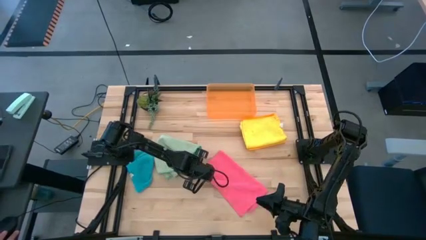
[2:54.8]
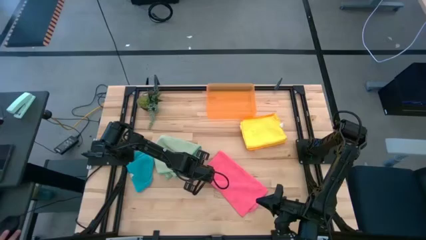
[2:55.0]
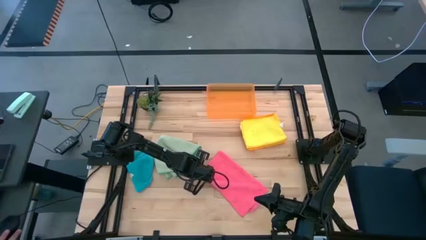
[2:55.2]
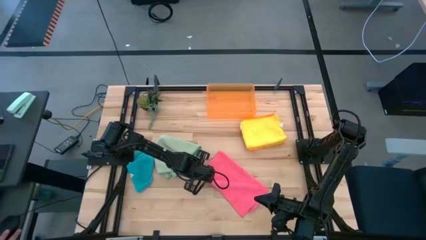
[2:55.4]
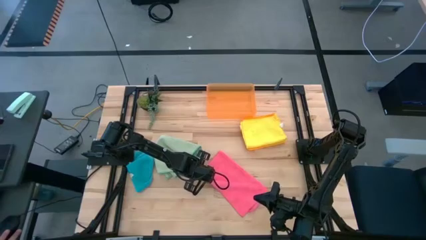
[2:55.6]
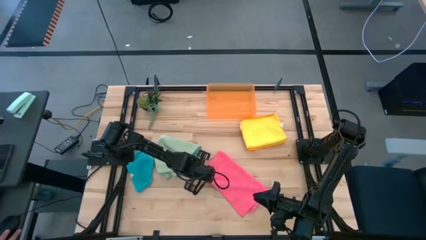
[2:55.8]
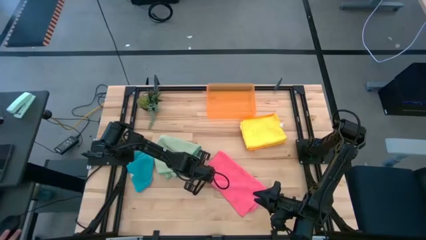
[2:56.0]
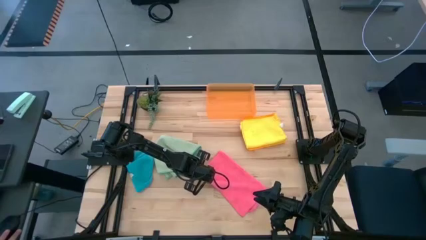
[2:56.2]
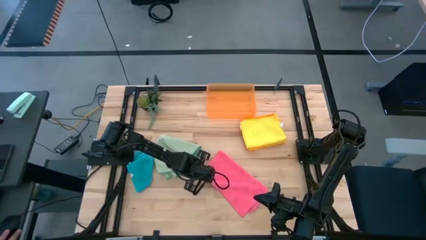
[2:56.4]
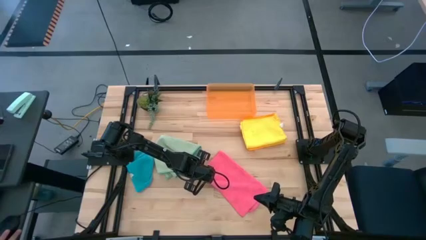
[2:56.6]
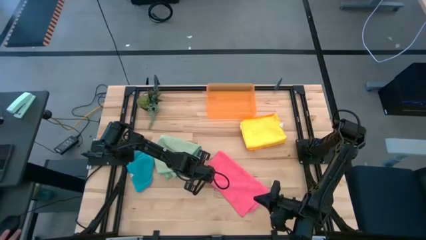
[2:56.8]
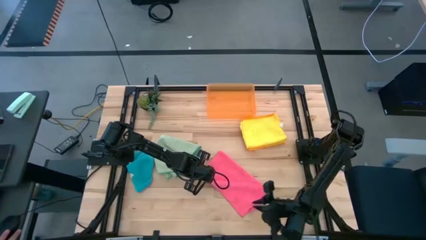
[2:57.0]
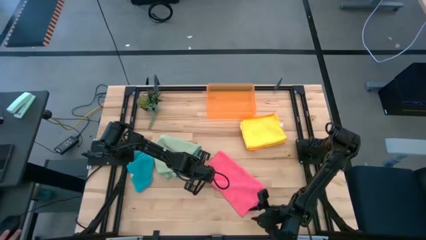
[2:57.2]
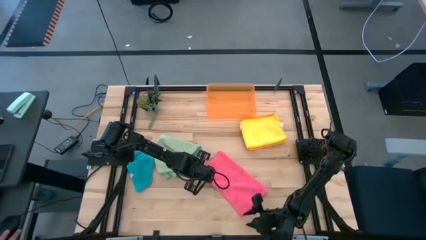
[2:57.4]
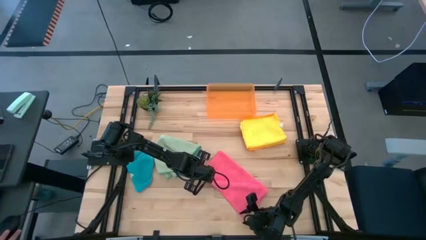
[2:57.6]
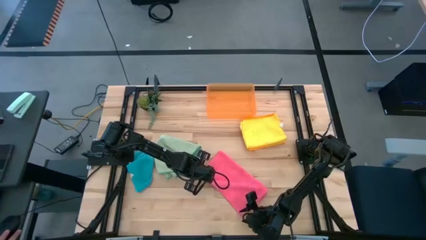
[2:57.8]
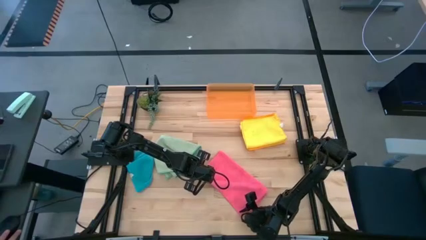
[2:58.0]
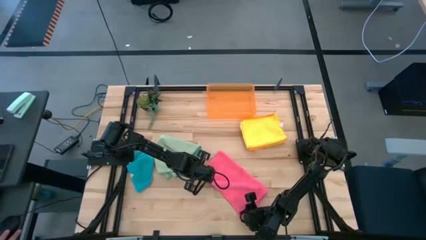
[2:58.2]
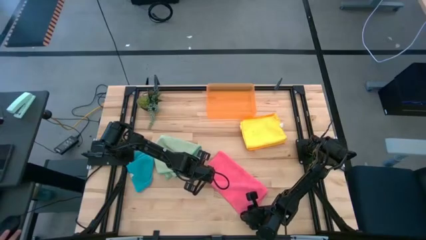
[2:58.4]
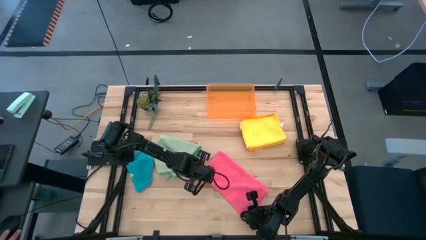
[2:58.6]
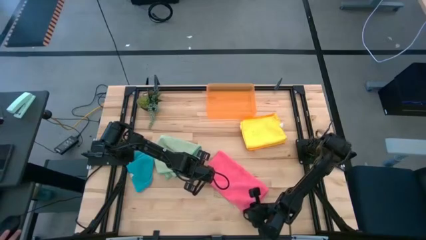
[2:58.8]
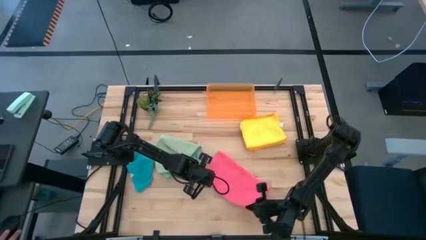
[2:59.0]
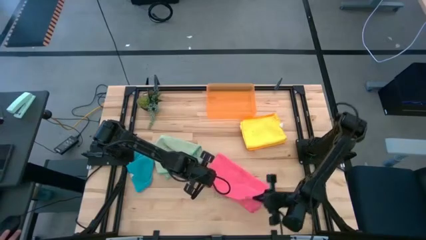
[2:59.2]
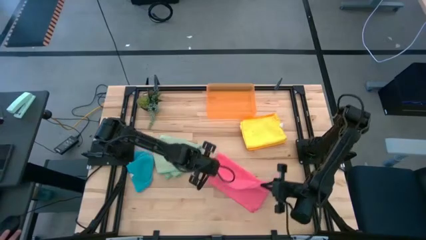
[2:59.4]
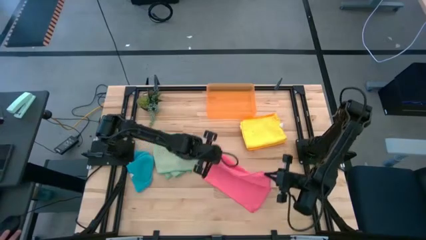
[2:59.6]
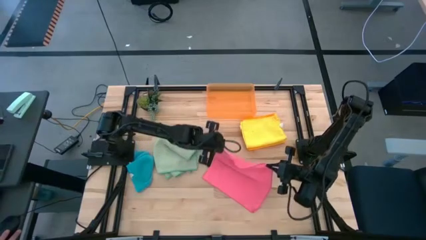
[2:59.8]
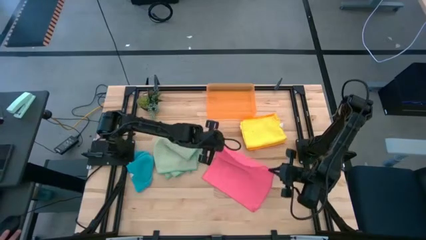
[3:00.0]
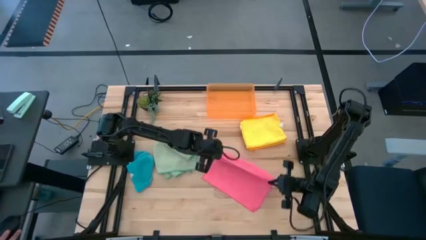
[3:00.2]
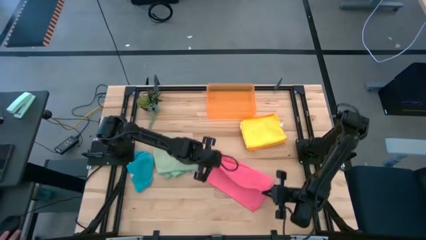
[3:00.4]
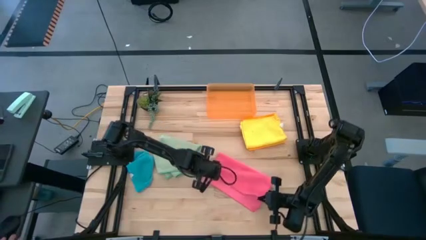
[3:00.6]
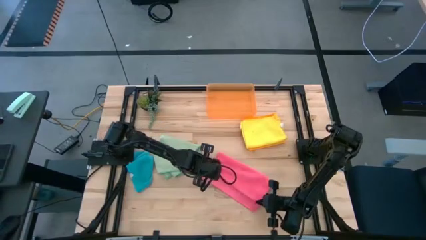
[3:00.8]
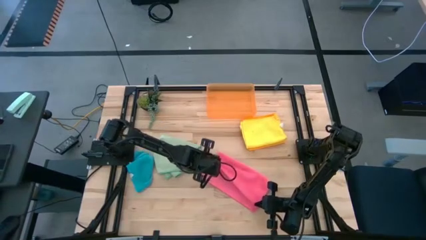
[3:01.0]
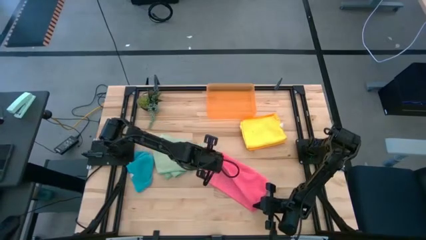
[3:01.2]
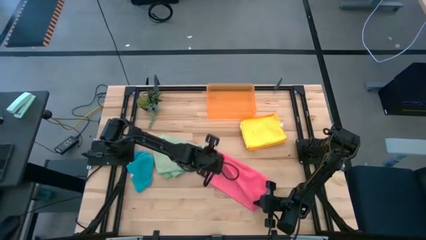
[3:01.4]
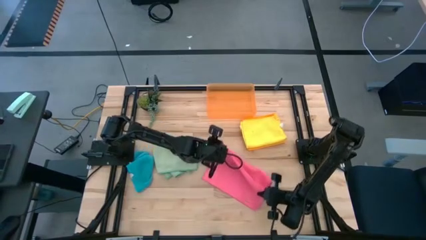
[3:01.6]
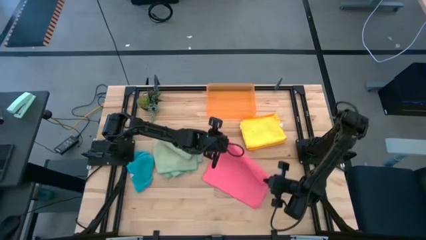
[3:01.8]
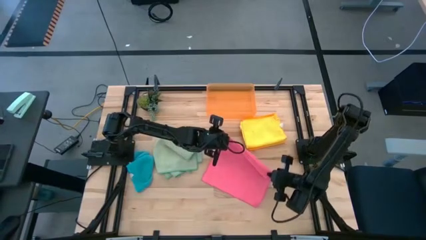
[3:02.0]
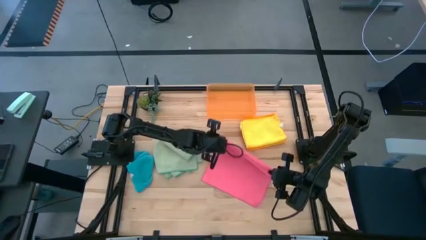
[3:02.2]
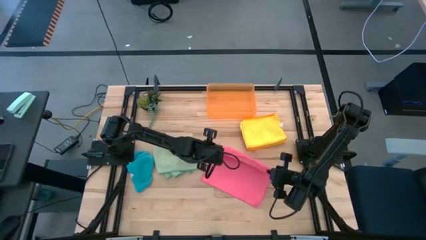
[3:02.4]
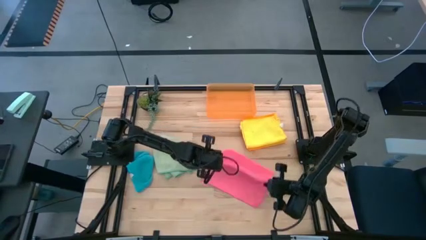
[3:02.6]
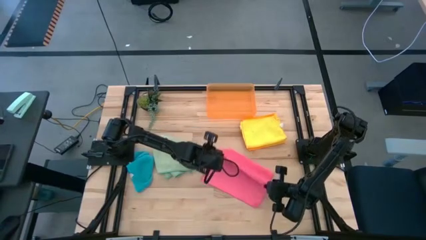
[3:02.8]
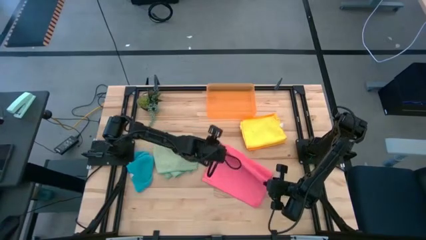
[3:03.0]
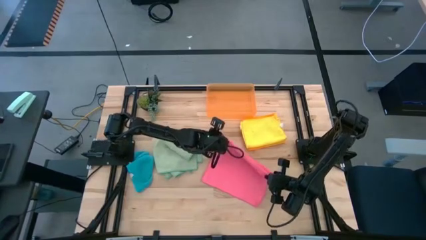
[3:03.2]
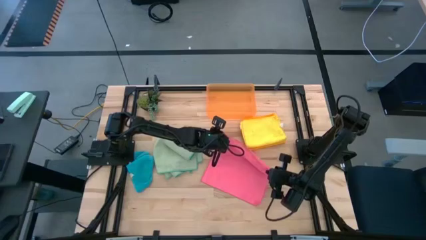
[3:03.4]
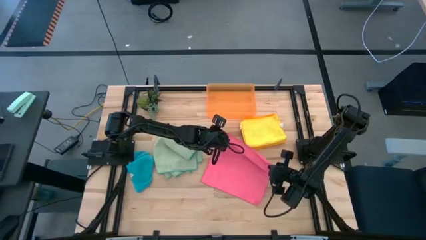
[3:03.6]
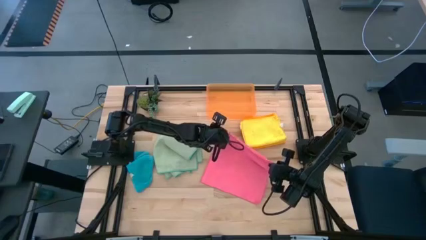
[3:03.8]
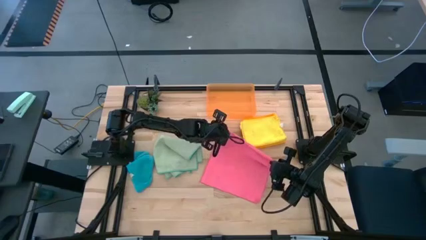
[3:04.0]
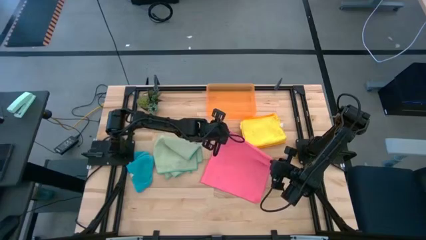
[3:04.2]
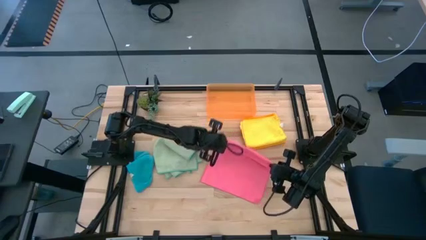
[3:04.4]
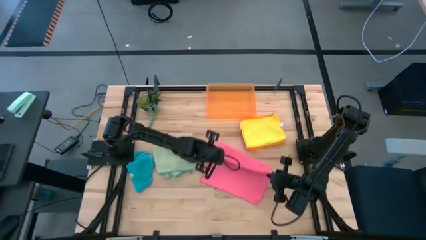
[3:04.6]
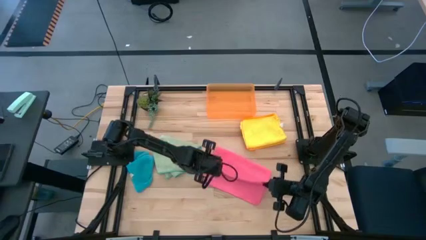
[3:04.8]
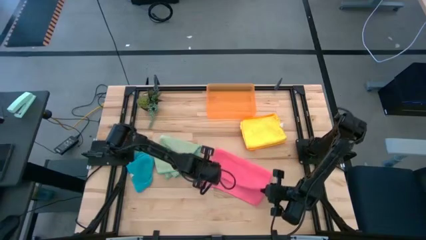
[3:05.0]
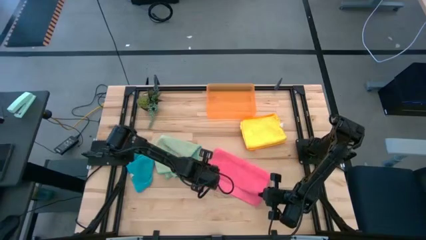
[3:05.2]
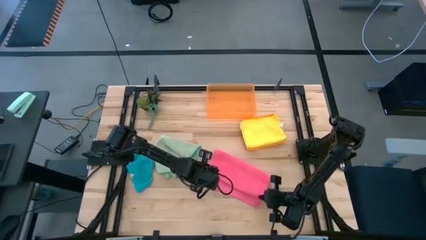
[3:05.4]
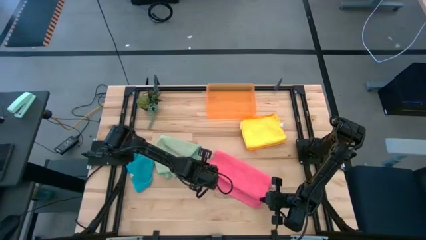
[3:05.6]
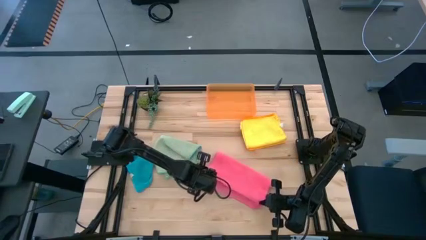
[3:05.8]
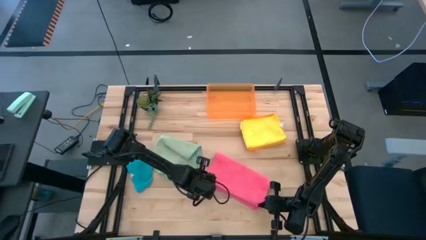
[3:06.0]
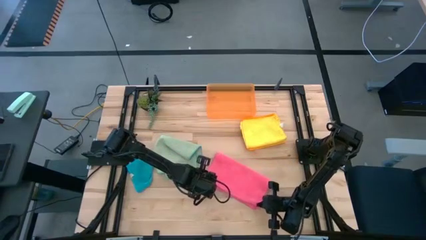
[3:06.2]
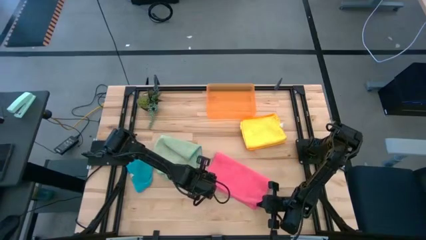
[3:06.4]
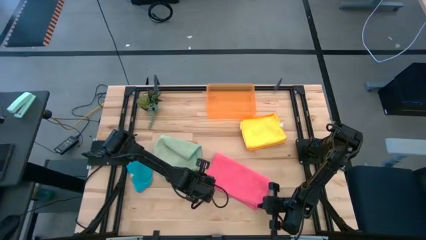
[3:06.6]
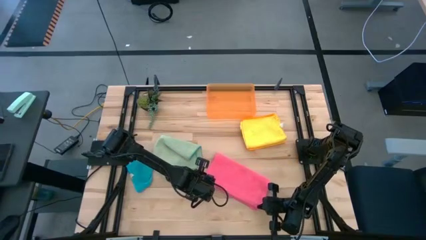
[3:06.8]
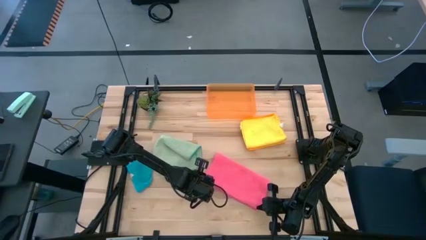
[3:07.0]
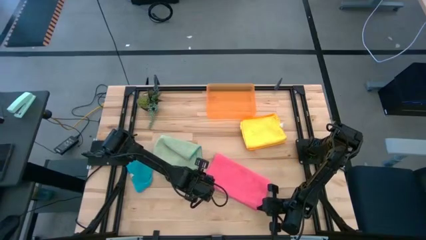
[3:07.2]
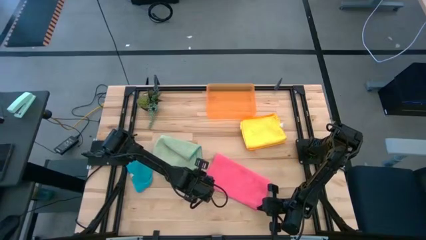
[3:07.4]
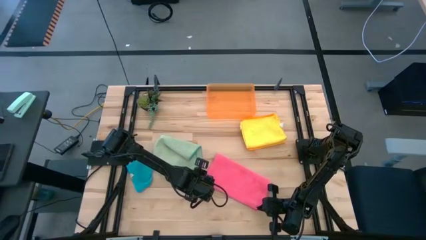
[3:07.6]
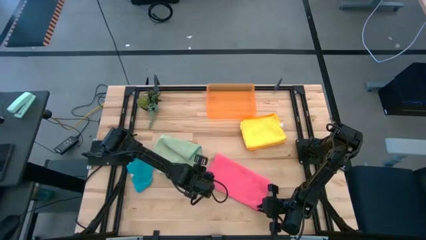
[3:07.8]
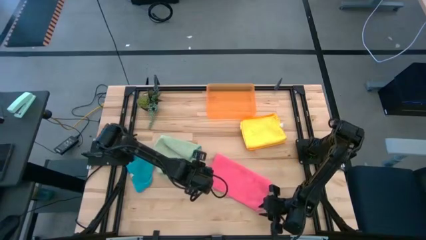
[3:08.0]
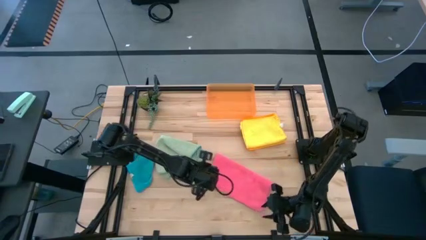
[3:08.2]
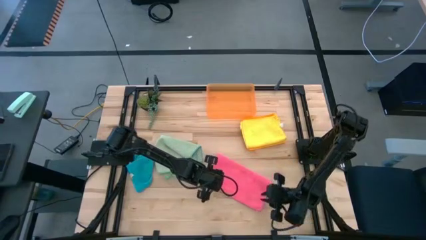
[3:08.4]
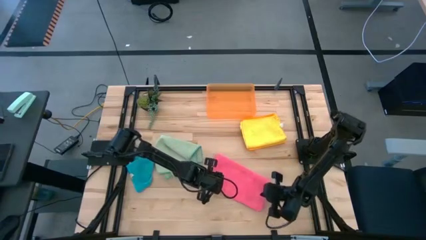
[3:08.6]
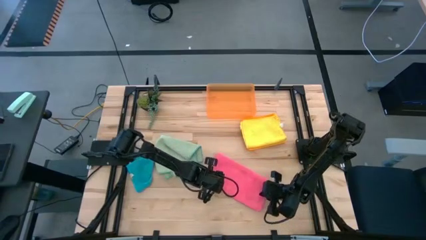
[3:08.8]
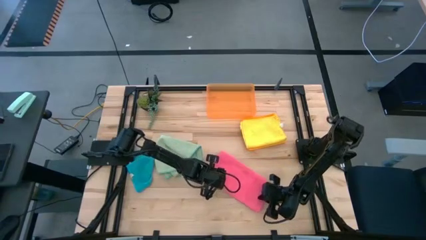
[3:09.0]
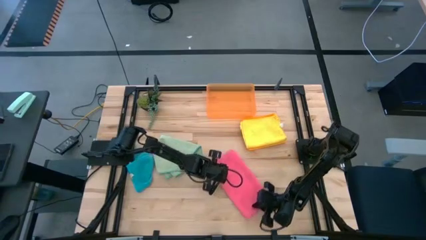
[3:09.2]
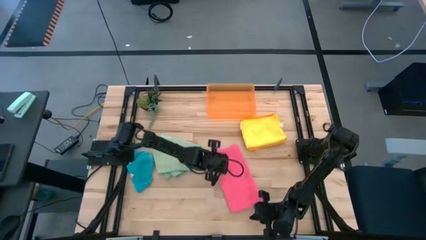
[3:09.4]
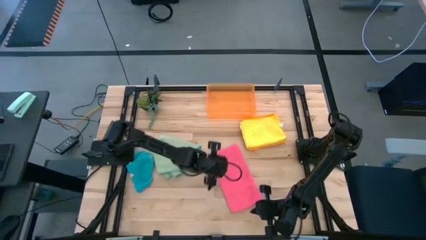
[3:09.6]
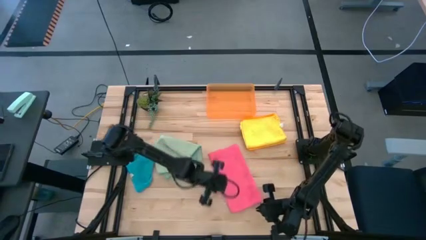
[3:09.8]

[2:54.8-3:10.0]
Task: Fold microfiber towels
Fold the pink microfiber cloth

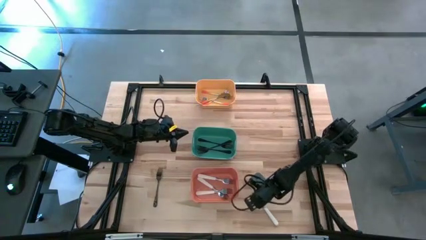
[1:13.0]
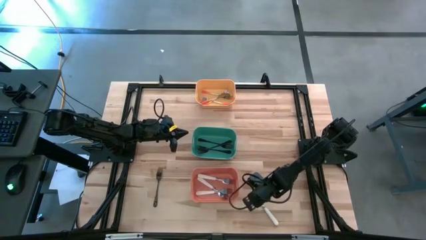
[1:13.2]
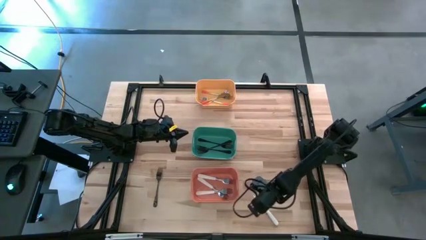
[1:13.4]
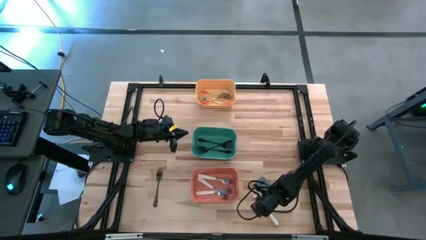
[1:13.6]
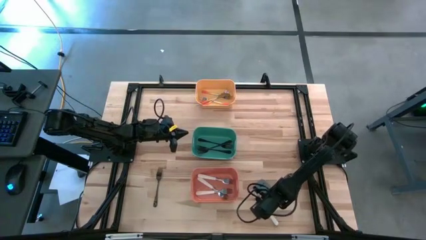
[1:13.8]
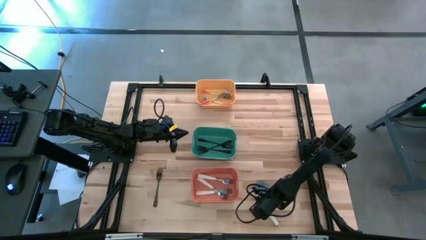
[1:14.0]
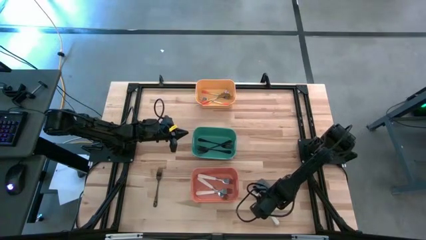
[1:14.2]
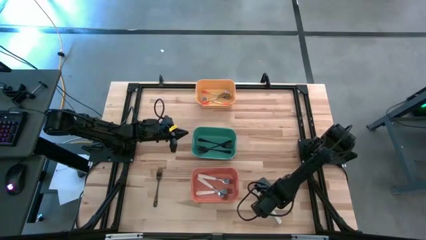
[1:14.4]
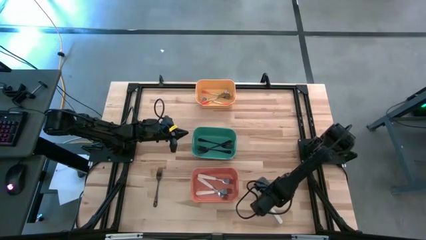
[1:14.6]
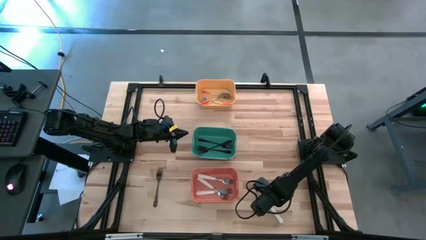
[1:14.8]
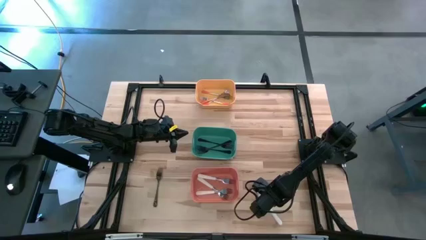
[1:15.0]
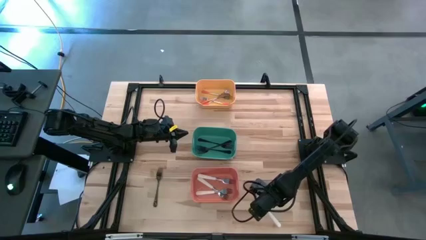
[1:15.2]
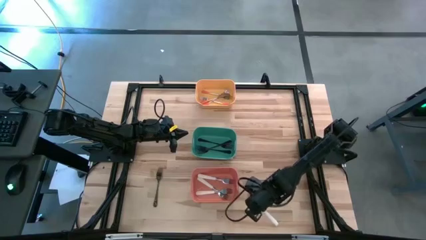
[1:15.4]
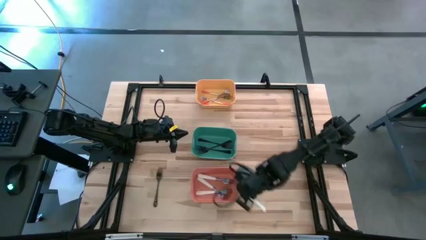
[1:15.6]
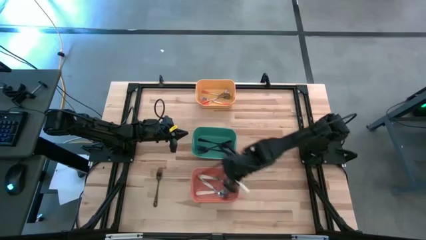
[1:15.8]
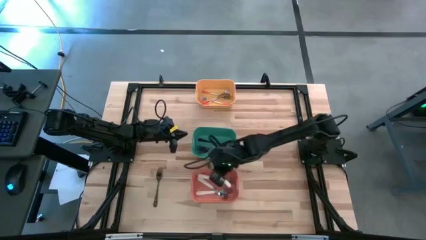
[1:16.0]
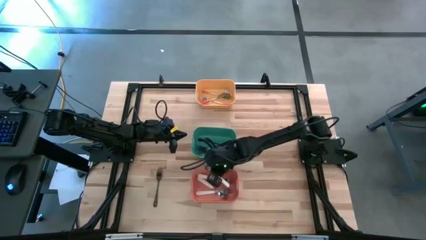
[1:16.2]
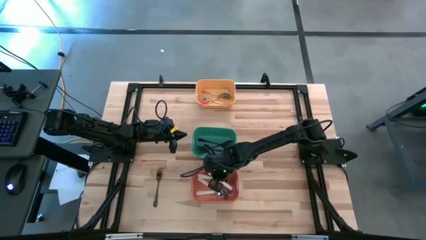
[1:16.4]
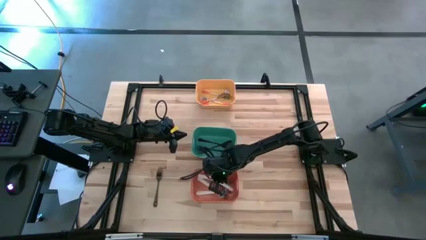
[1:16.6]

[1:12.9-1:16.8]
Task: Sort silverware by color (type)
Put the white fork into the orange bin
